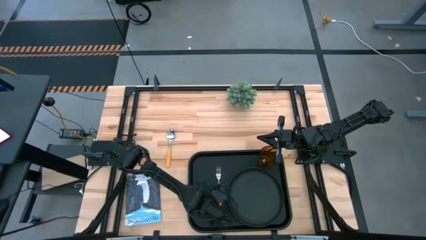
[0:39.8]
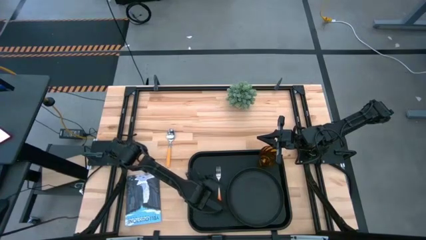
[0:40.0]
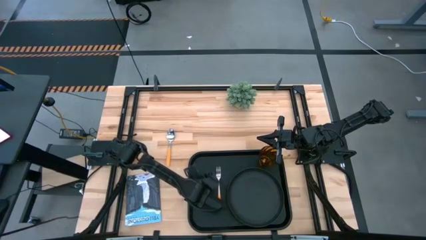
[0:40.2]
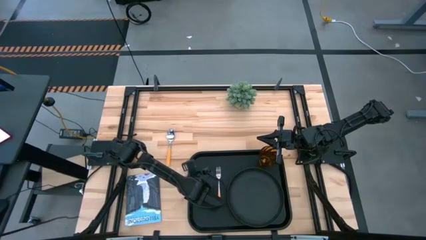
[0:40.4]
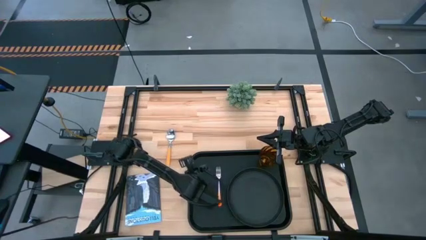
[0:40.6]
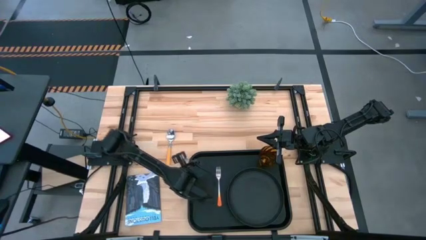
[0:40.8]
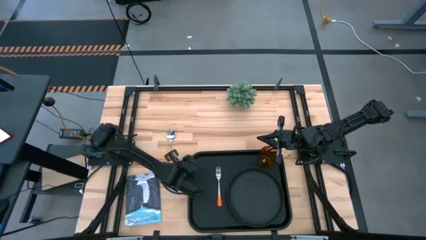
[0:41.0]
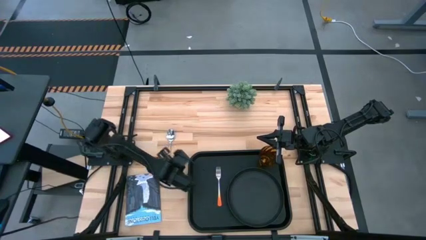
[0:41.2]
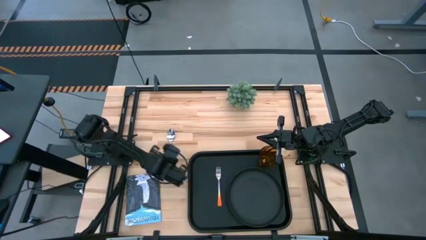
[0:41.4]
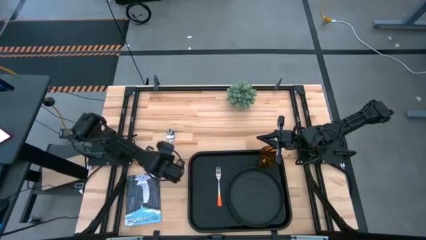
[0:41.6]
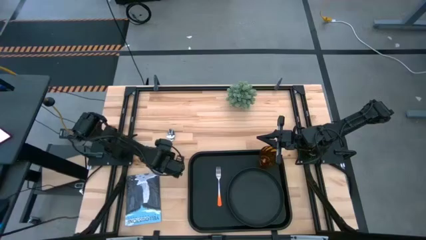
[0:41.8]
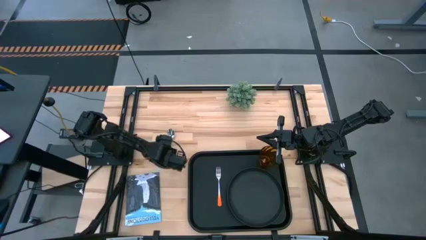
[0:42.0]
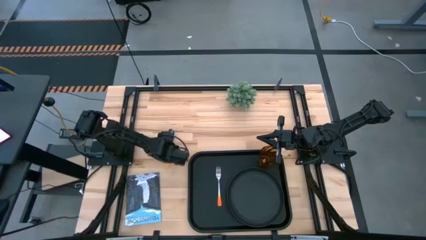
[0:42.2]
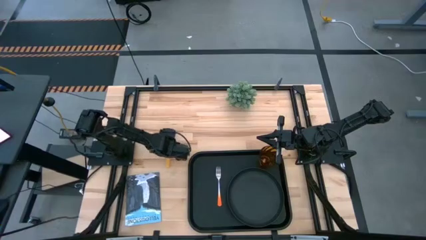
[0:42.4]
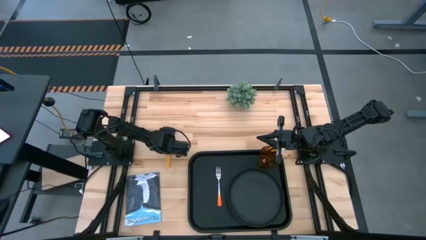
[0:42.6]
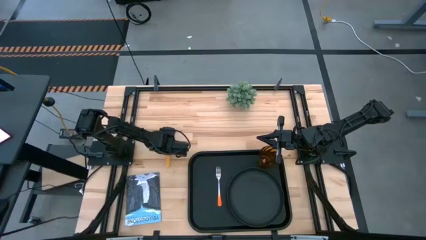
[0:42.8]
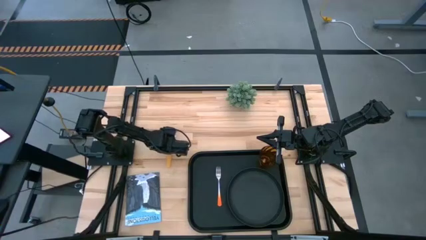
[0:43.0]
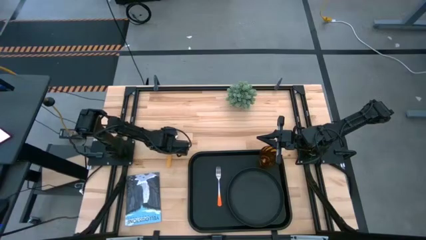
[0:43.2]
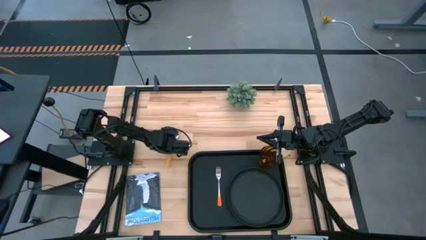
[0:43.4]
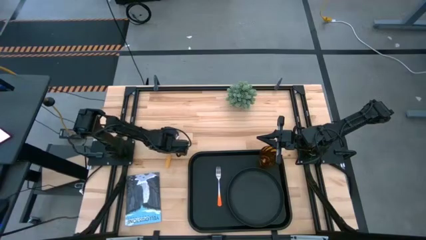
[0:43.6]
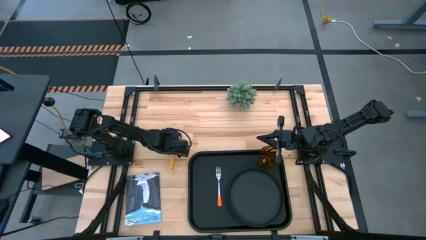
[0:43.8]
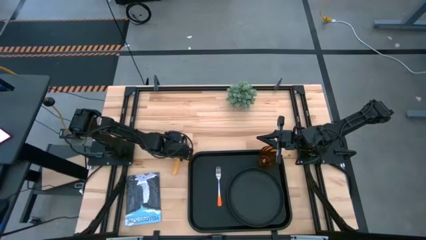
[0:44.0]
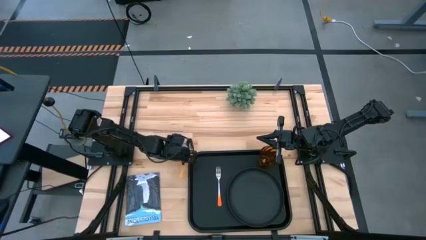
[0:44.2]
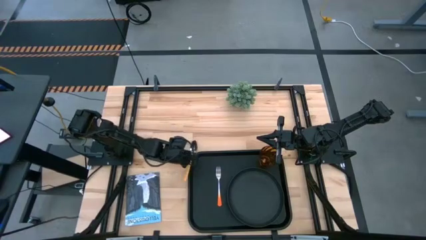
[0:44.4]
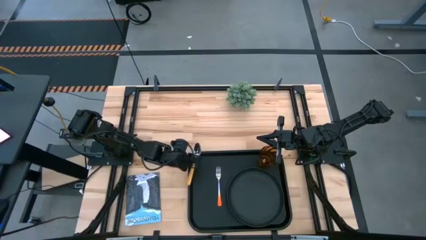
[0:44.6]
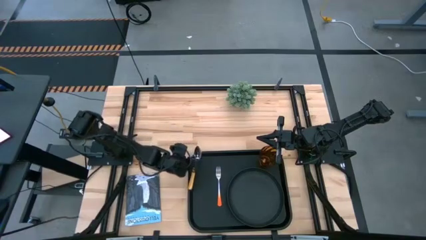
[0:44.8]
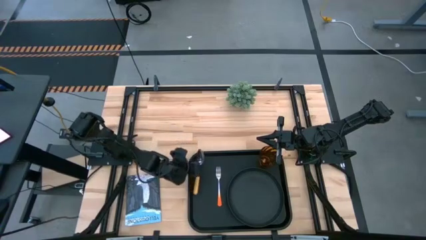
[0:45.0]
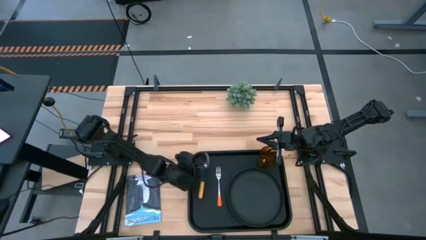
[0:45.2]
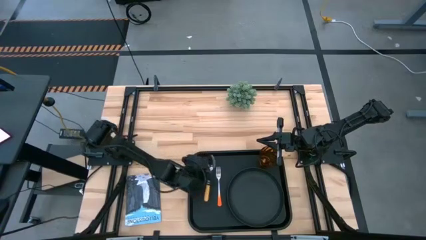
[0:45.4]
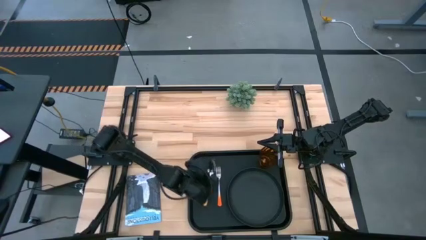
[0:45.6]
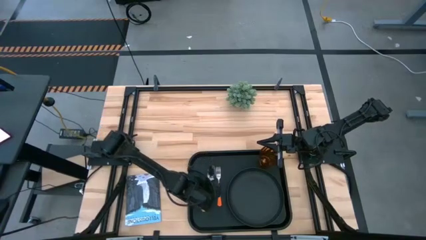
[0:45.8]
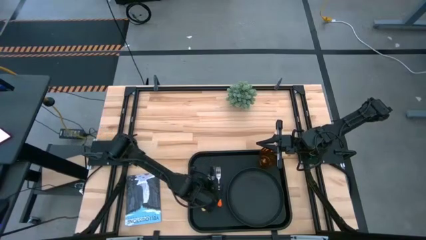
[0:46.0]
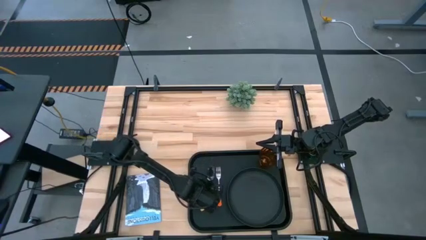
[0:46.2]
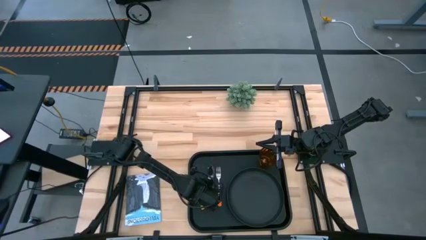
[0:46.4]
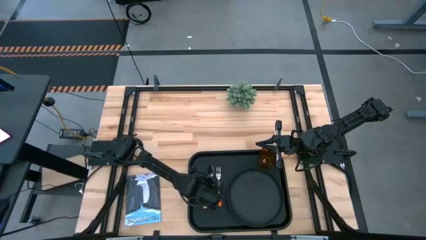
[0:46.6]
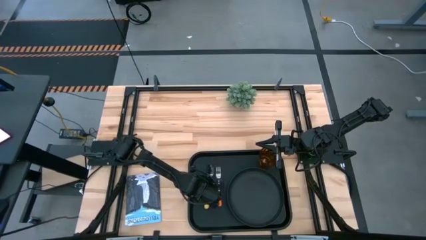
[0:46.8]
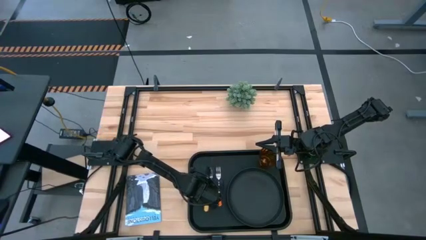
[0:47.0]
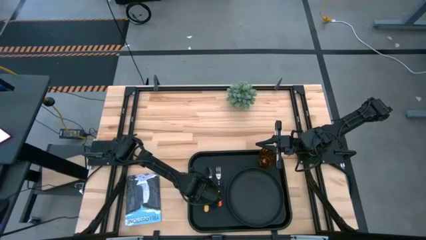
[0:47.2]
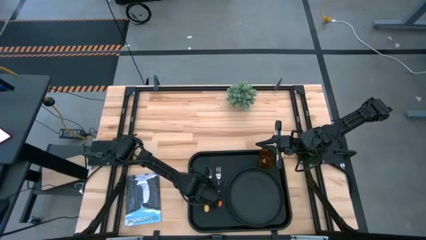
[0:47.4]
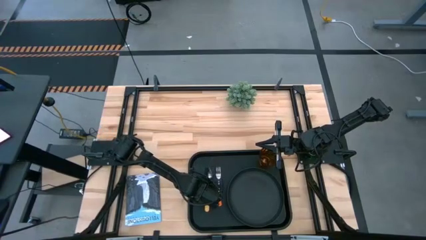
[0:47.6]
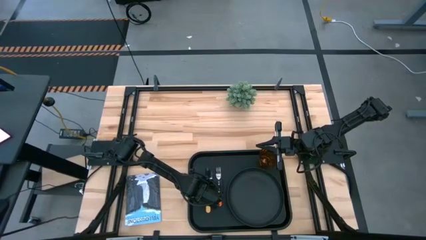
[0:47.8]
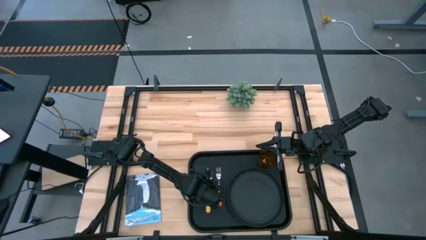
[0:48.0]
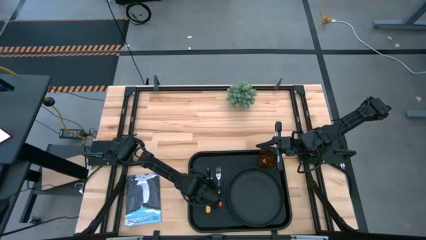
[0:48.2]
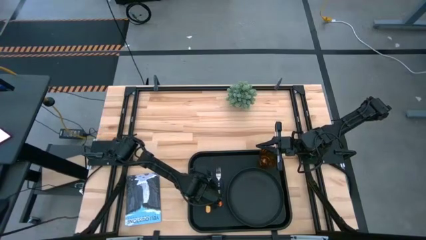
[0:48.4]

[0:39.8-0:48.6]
Task: Pick and place plate/cup/fork/spoon on tray
Put the yellow spoon on the black serving tray at the left of the orange fork

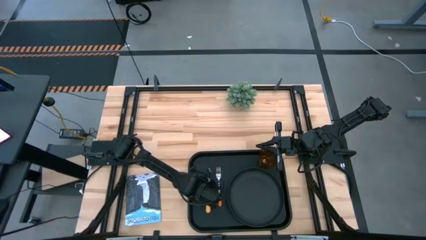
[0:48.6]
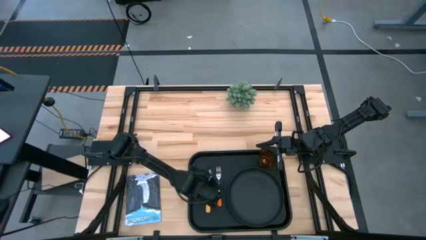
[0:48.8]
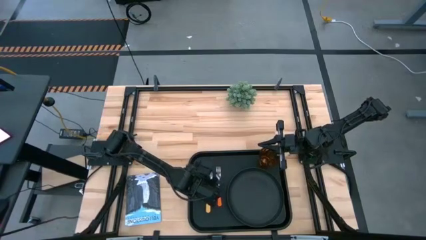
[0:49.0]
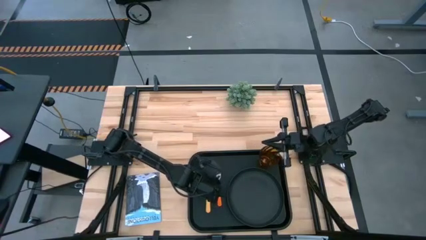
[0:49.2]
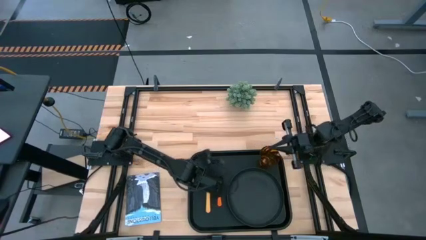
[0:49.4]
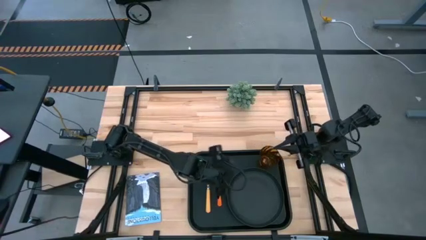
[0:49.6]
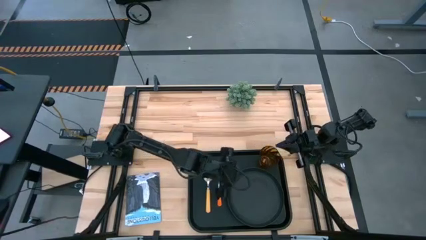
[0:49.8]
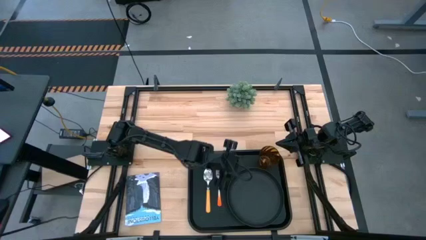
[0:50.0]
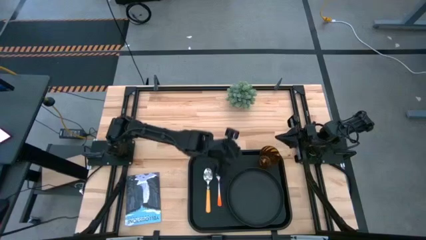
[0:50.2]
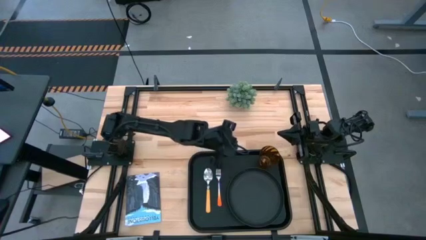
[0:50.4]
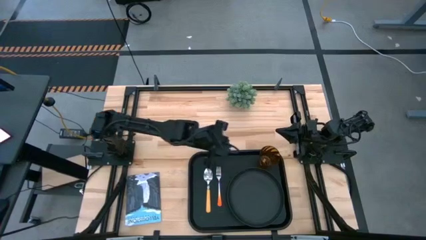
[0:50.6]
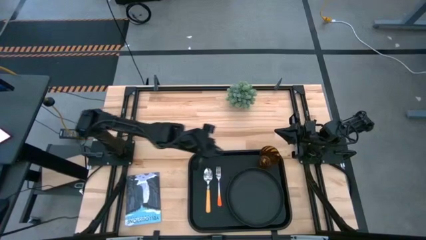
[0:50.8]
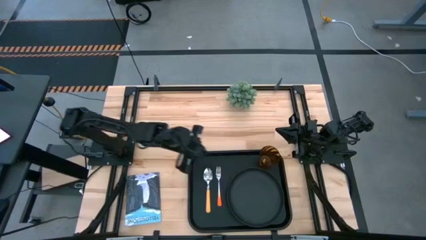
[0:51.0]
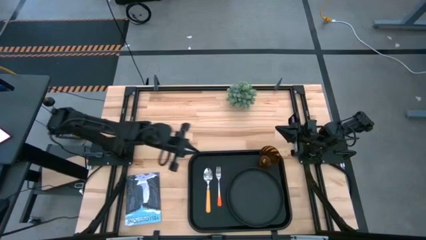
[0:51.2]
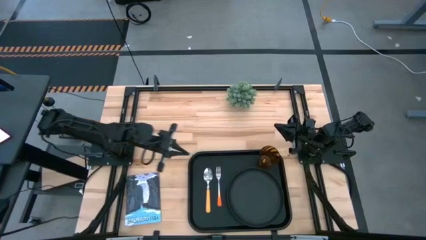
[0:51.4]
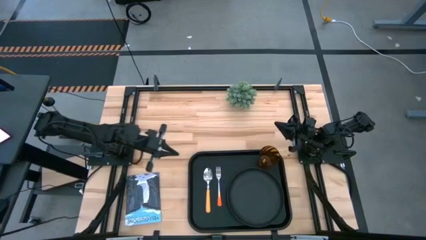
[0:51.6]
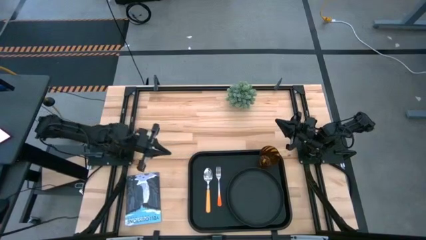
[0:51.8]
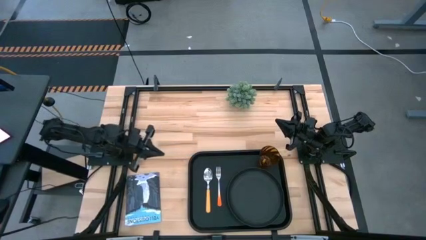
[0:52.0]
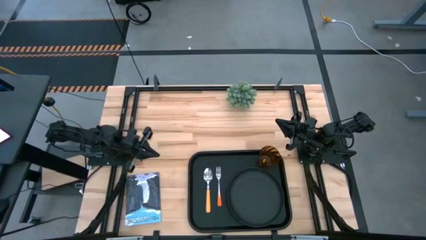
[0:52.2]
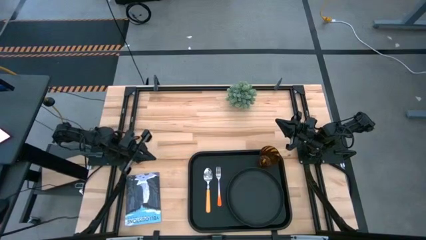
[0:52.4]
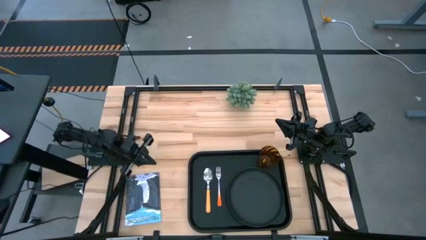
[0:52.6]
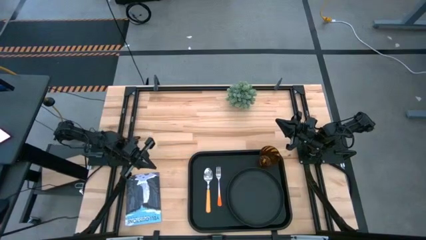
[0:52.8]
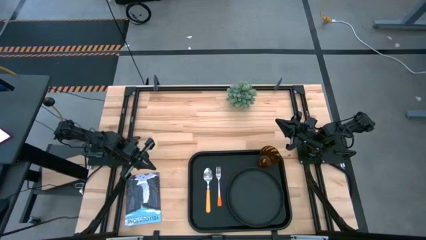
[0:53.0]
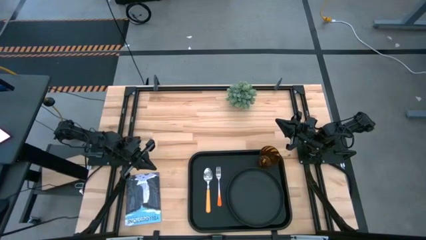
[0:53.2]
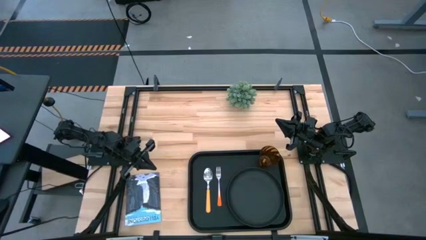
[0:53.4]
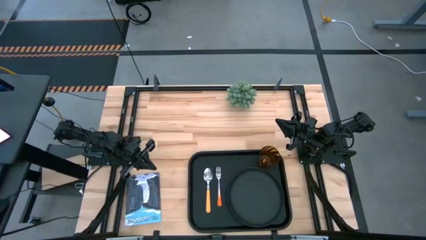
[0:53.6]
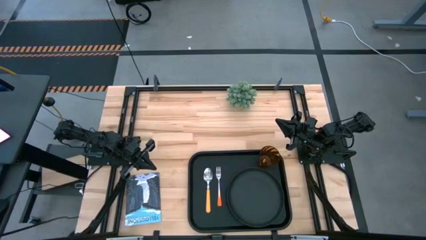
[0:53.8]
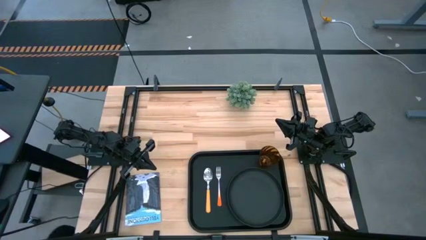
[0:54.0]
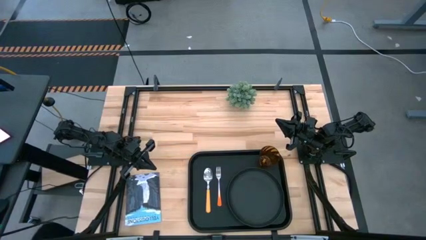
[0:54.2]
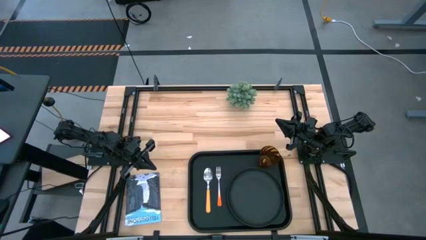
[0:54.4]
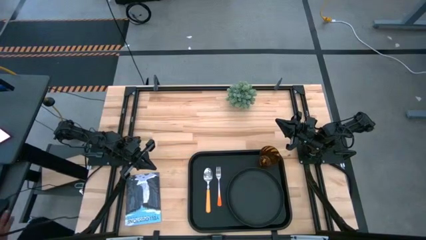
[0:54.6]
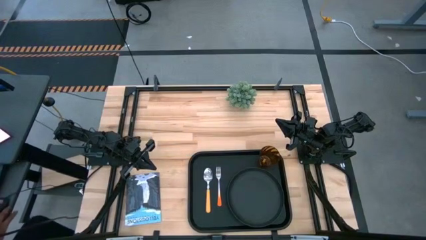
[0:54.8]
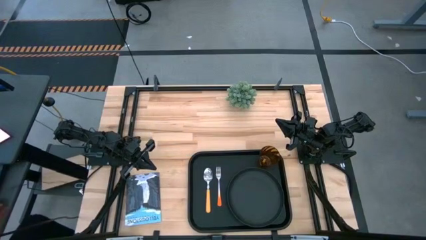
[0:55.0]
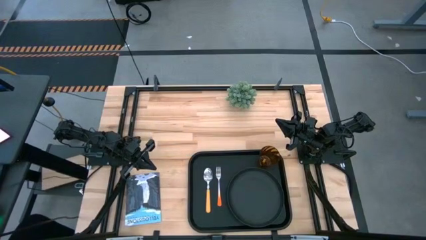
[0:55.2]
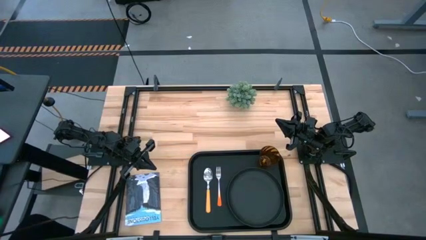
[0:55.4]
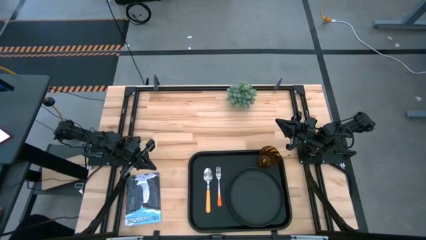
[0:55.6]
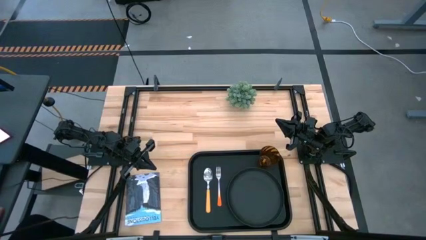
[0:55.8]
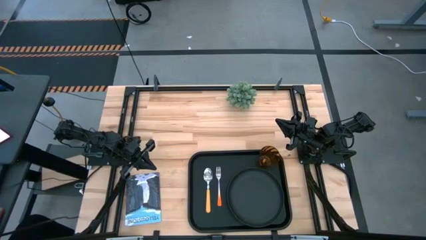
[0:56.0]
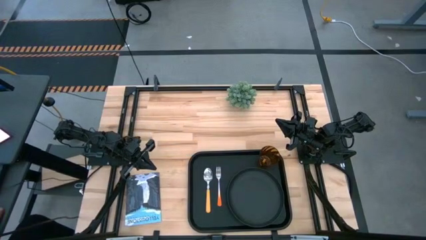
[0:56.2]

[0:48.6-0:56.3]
Return to Home Position
